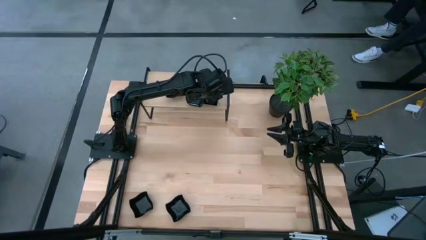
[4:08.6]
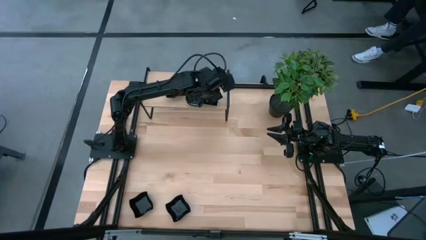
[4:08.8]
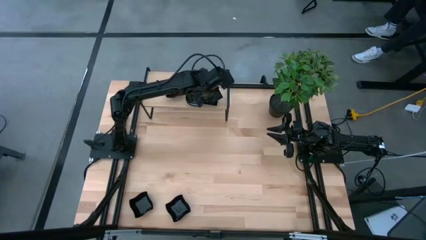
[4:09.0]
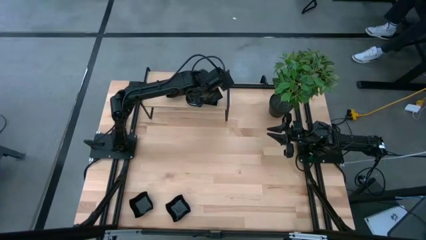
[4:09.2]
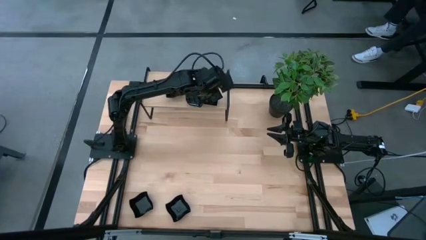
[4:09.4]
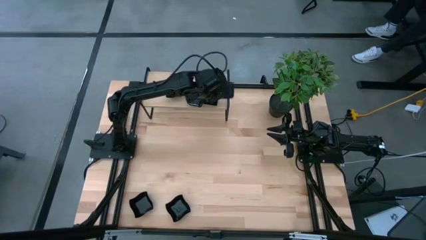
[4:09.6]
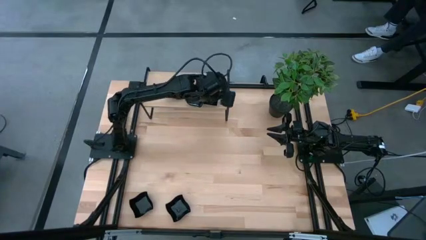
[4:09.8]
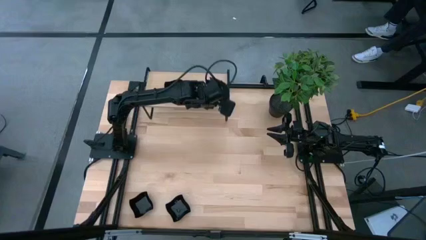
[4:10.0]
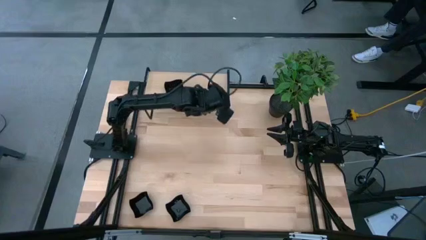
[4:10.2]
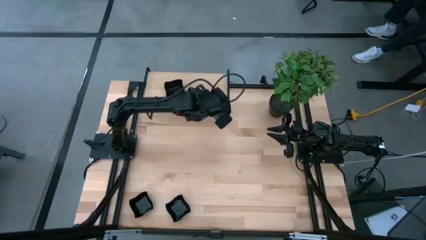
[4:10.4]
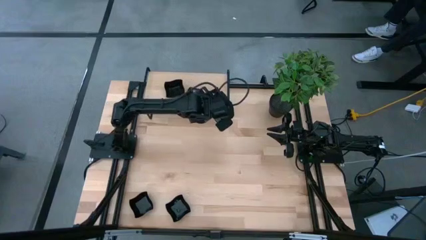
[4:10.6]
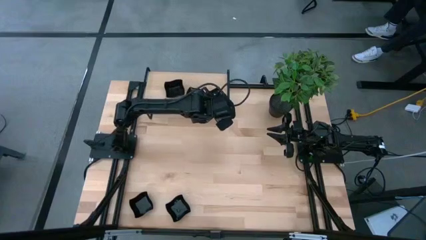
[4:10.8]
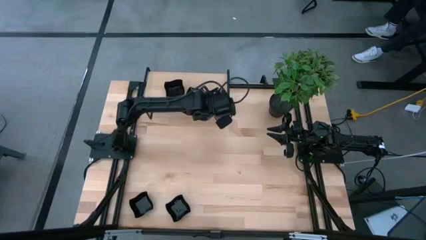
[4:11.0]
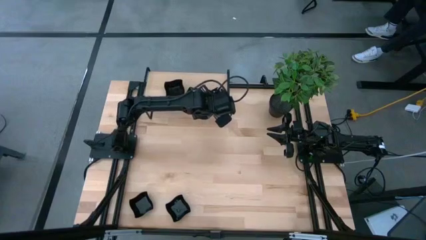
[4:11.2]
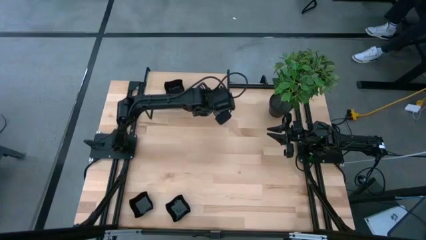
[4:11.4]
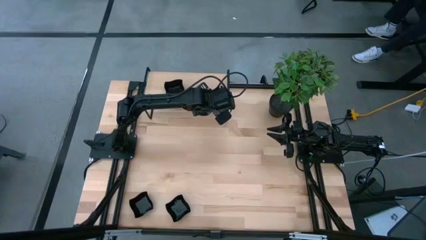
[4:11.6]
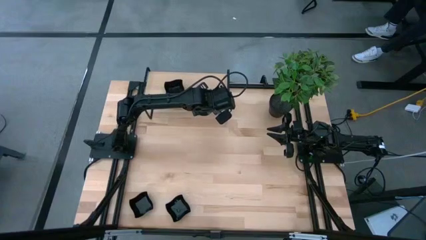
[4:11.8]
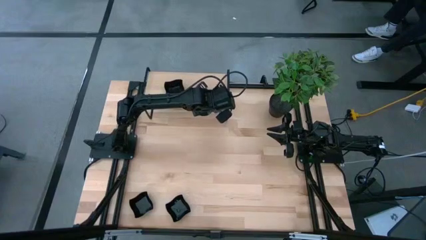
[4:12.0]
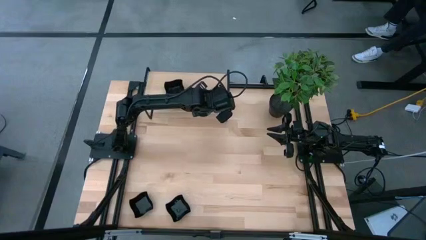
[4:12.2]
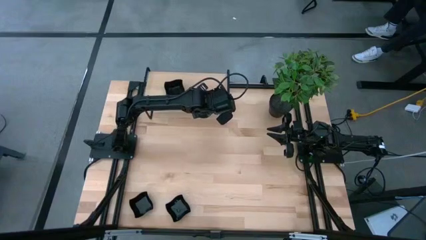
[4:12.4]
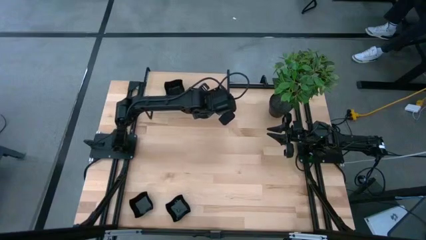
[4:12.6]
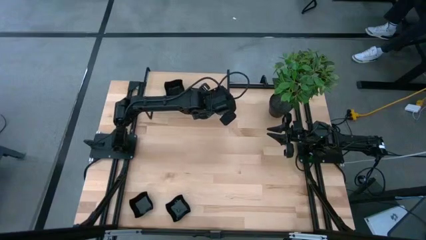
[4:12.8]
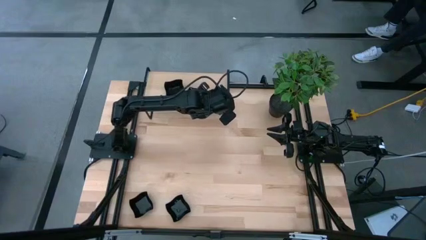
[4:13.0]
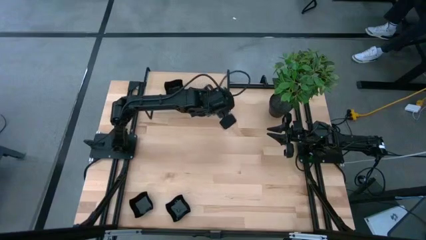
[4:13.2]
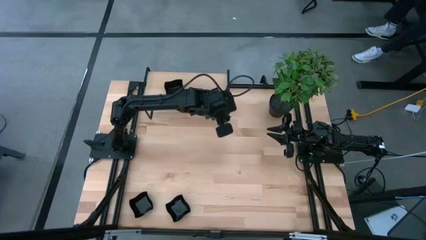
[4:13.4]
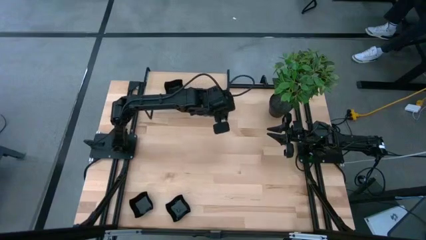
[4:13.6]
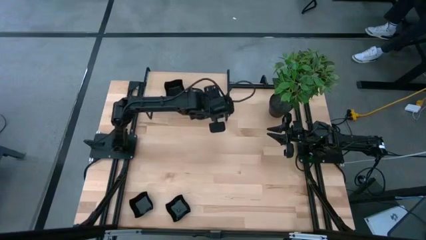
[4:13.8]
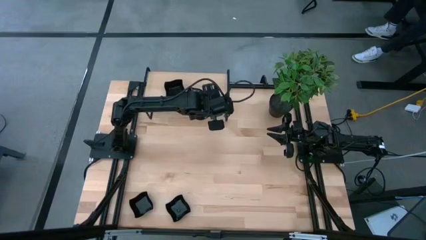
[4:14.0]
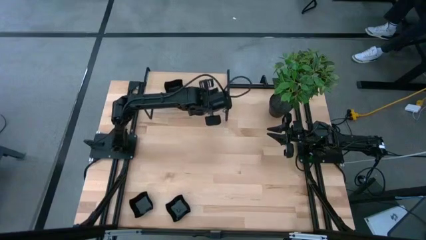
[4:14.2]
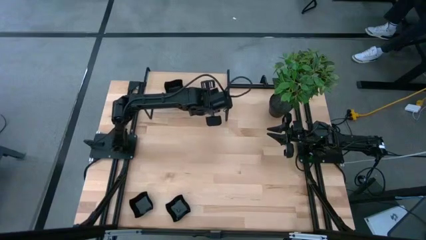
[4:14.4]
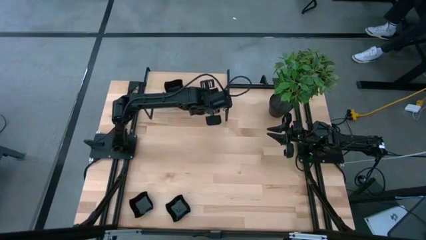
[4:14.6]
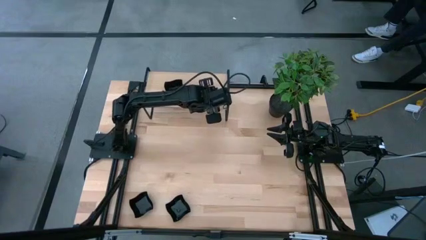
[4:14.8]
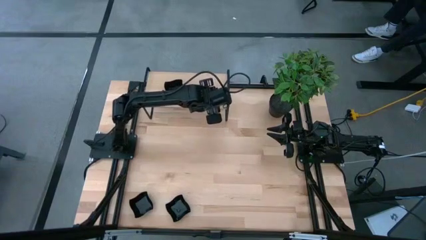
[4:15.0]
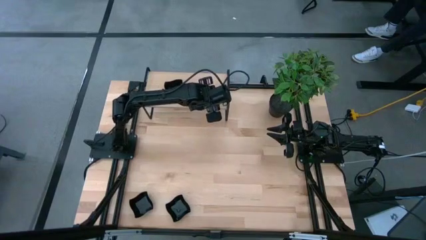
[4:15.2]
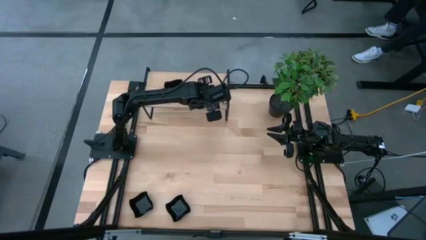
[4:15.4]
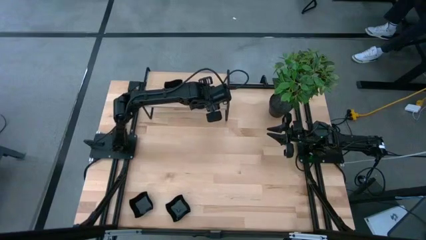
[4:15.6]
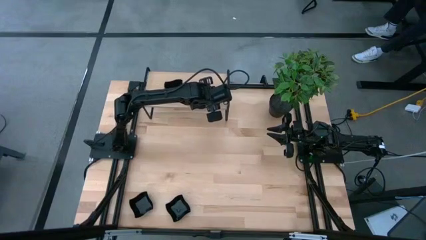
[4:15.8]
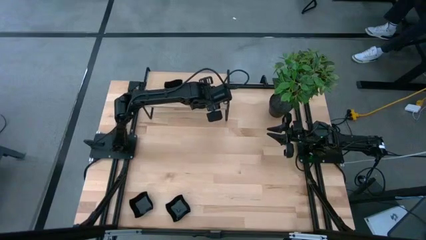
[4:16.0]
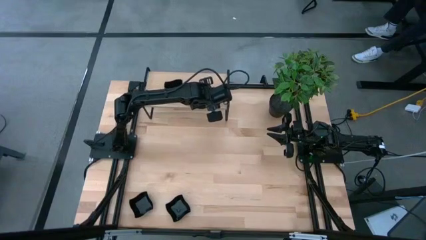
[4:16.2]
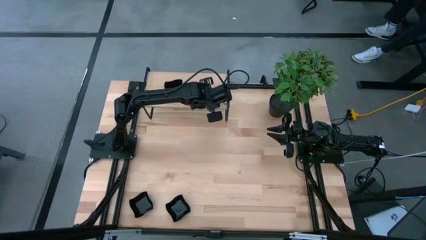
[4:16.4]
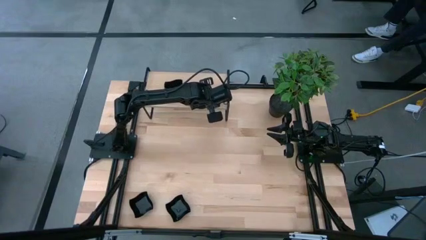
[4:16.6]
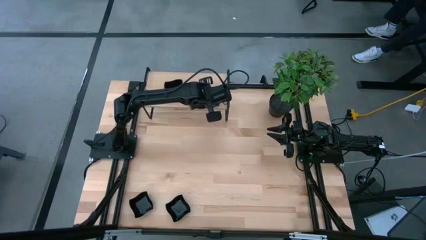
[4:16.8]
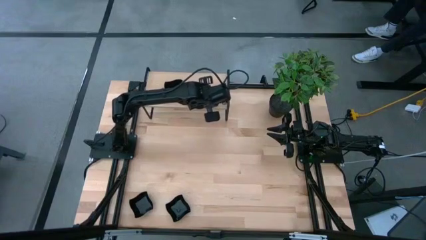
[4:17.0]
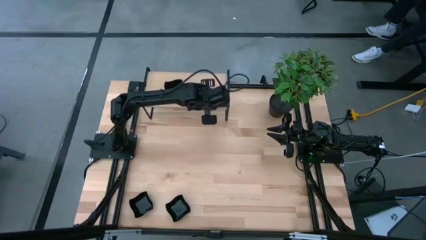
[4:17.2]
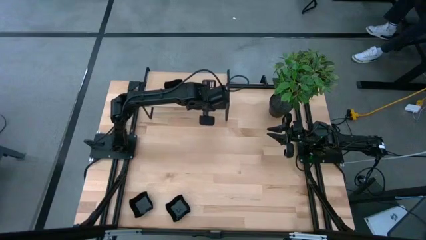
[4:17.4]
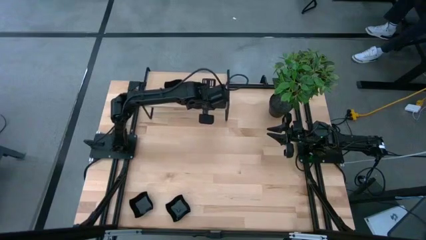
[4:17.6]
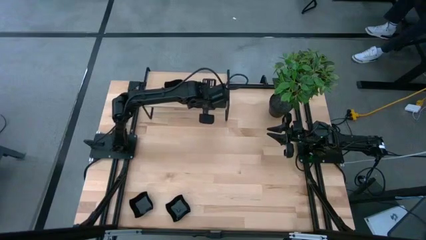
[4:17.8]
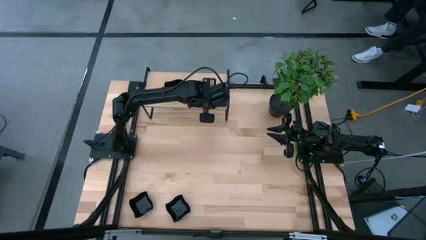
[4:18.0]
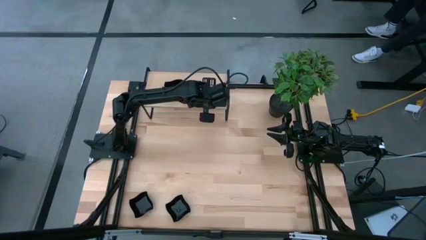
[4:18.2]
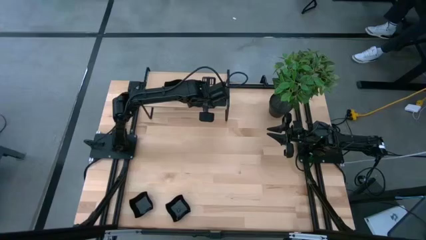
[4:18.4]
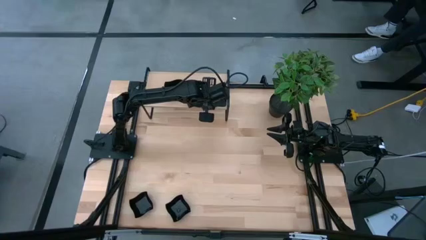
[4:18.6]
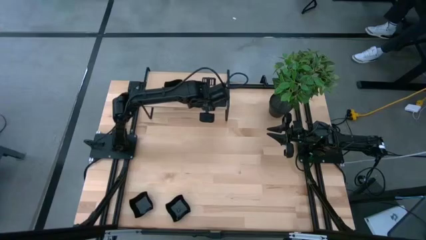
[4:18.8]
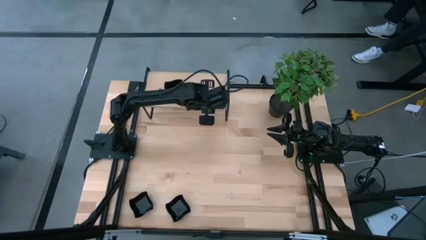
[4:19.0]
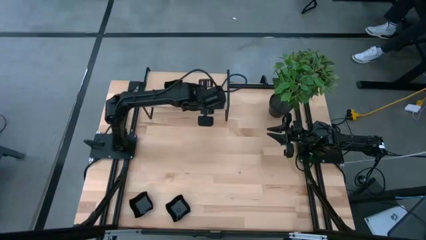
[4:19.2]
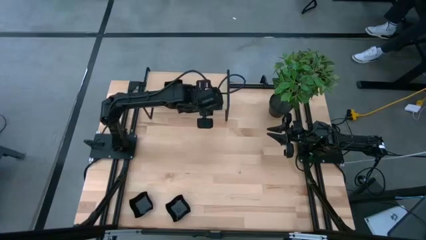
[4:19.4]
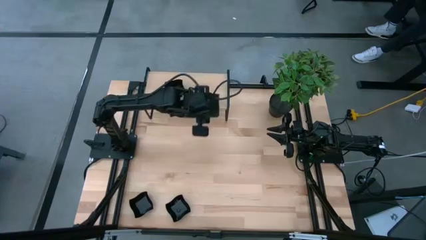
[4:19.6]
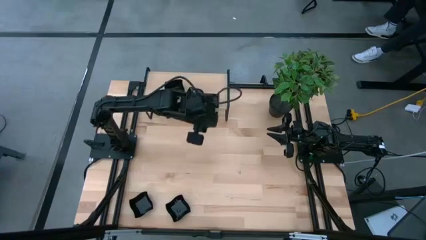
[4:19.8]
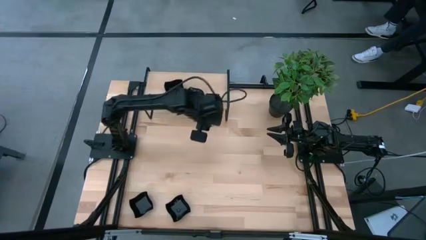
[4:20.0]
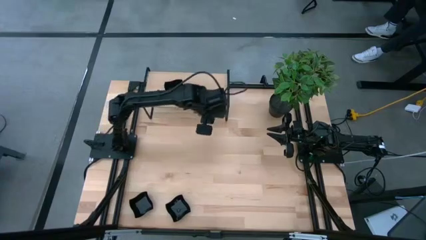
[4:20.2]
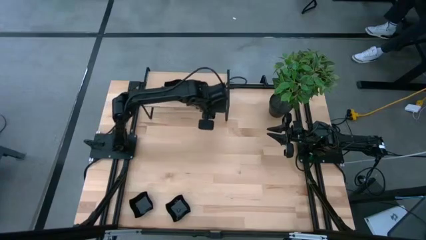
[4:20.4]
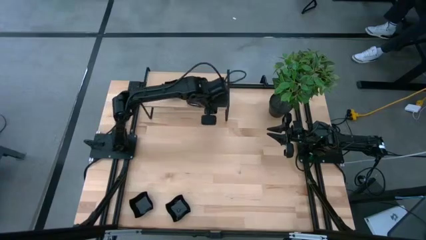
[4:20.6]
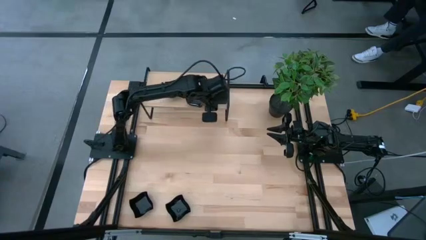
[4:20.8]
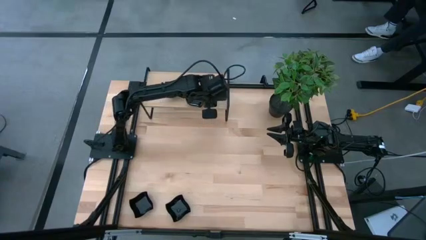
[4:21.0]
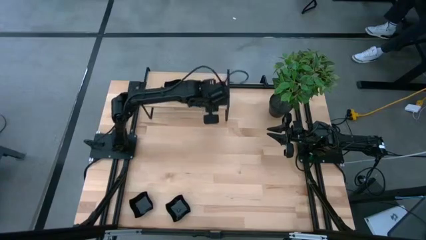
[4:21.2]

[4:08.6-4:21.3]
Task: Pick & Place Mini shaped plates
Stack the square plate on top of the square plates on the shelf

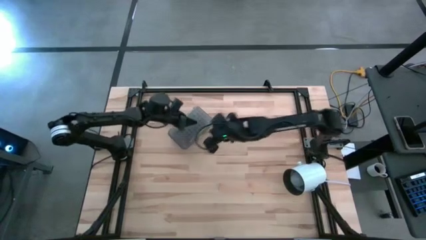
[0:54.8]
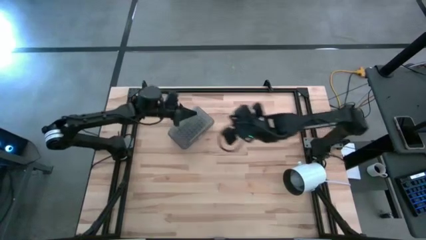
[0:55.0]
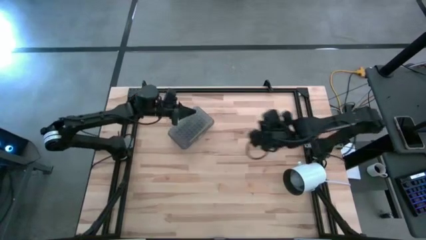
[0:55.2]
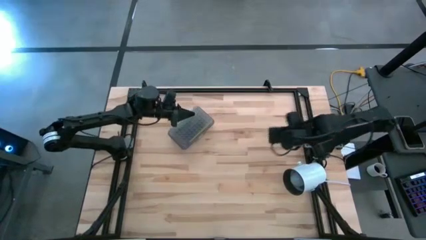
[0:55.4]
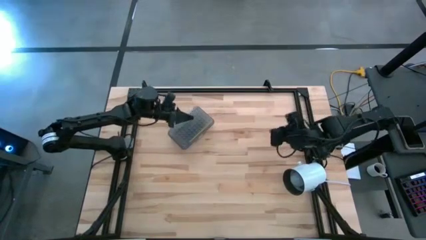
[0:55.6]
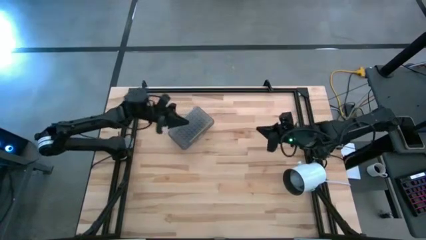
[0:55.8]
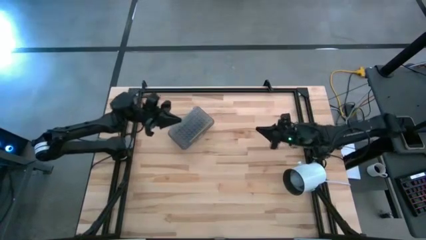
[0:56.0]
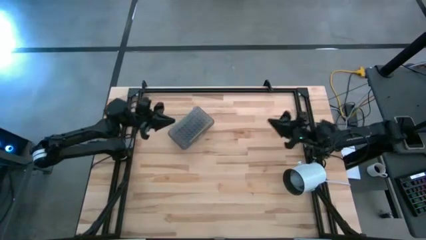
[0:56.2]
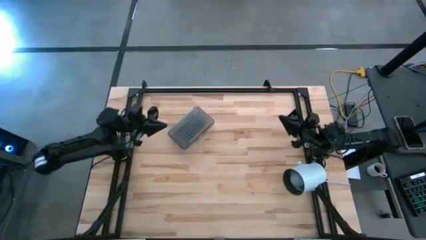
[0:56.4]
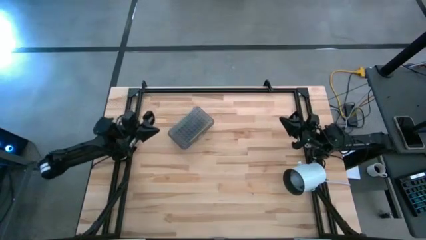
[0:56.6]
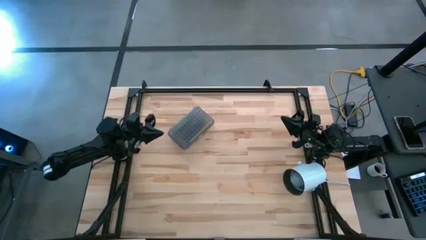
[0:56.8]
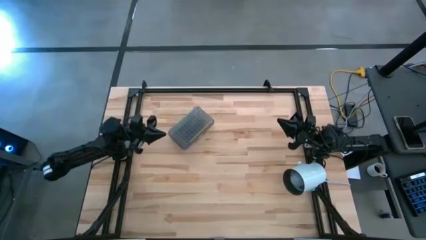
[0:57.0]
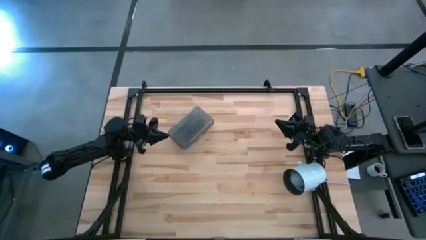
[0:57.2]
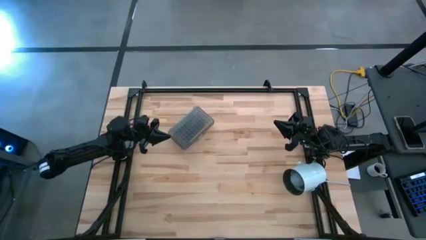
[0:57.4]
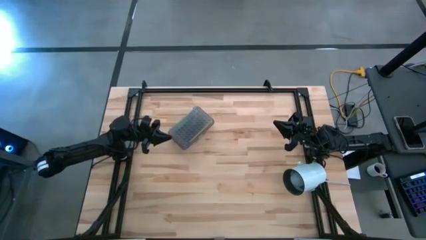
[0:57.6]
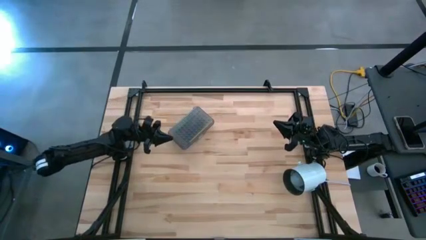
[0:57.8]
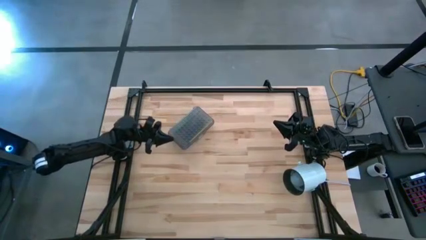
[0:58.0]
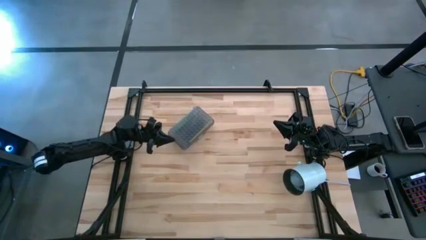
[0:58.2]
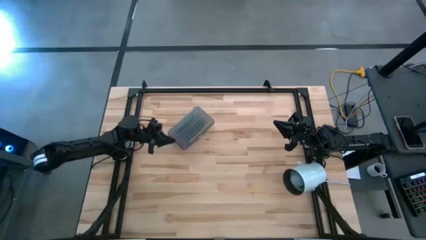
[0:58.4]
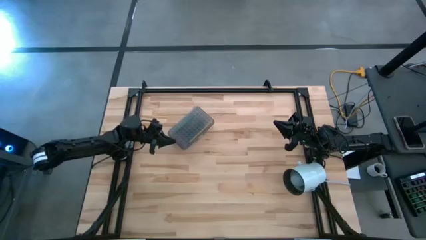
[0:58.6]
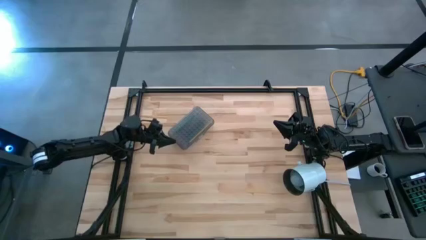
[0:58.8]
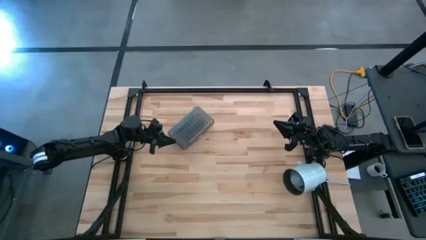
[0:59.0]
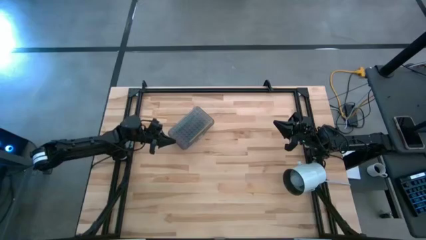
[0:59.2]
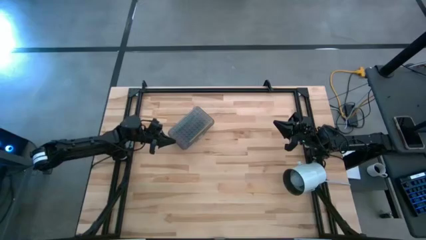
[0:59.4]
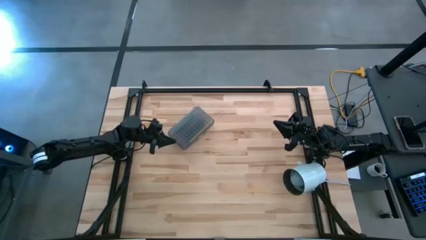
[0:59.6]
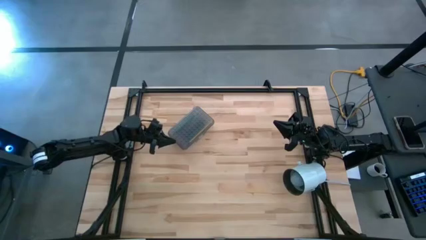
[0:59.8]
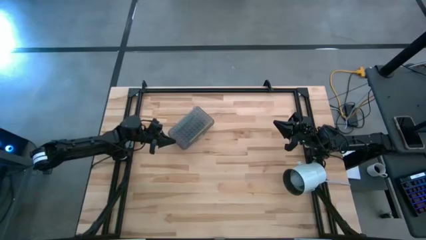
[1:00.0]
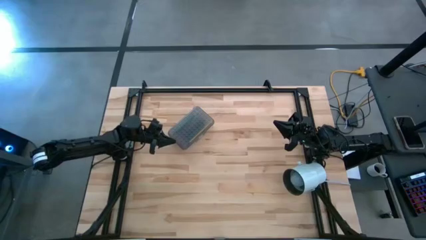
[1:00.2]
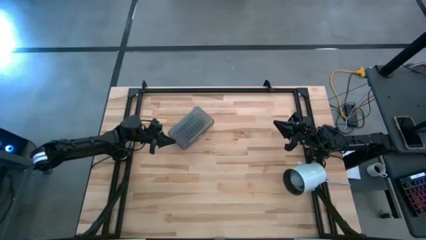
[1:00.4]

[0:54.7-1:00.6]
Task: Pick & place school supplies into a supply box
Return to Home Position
